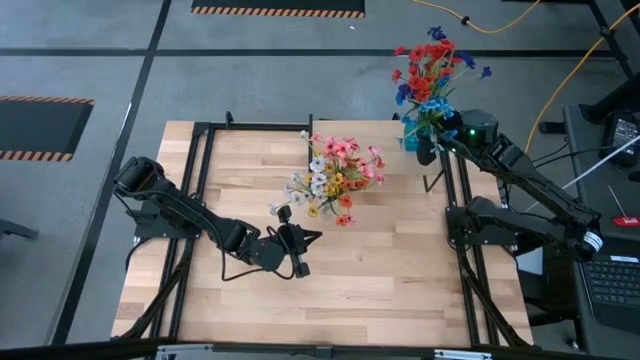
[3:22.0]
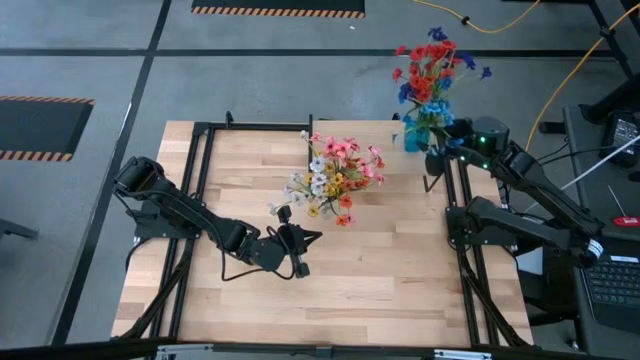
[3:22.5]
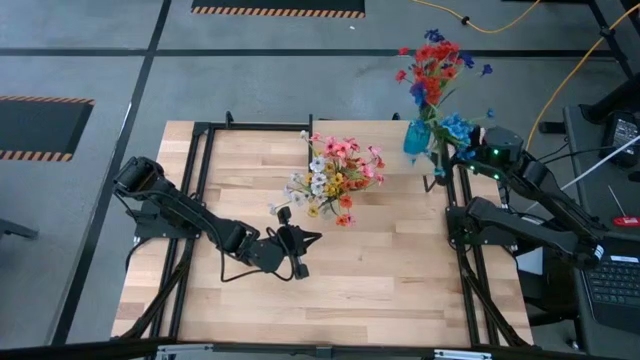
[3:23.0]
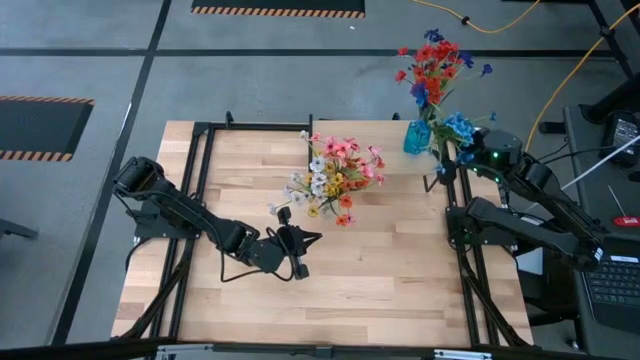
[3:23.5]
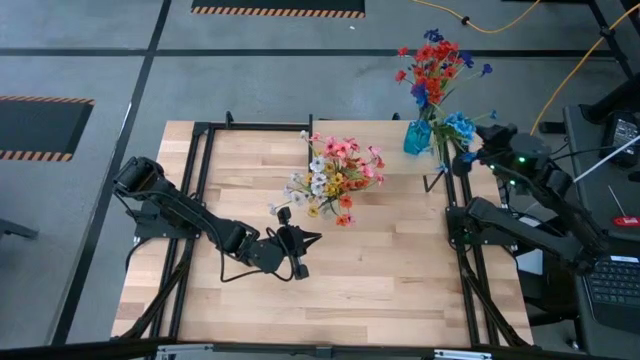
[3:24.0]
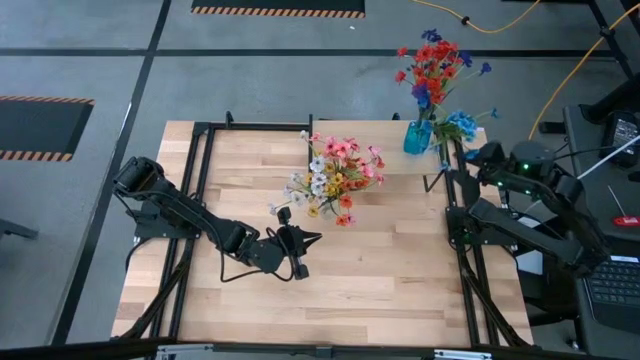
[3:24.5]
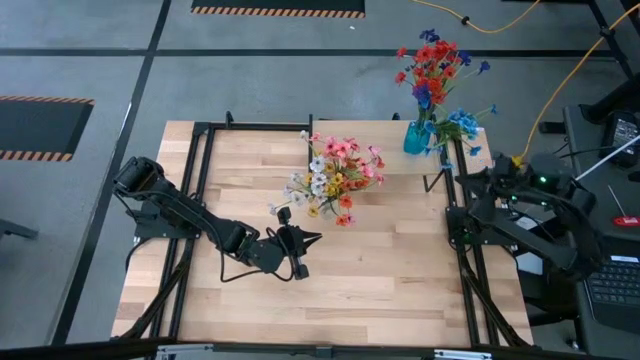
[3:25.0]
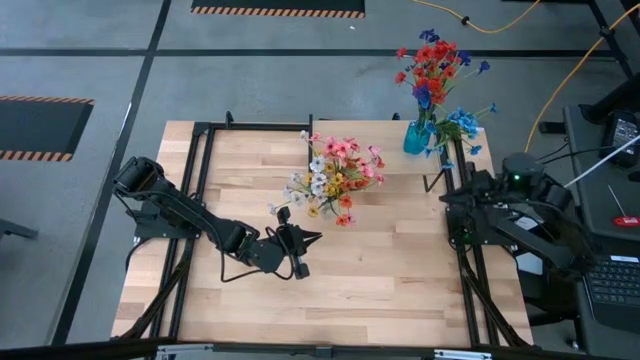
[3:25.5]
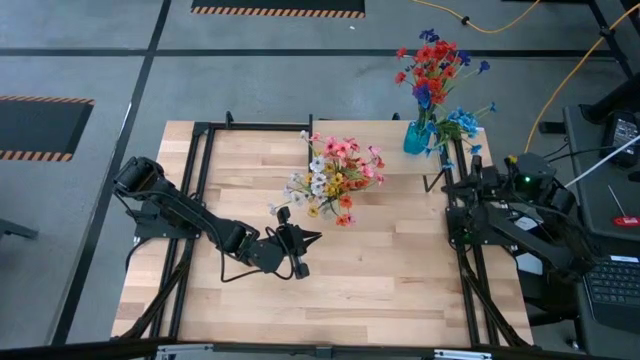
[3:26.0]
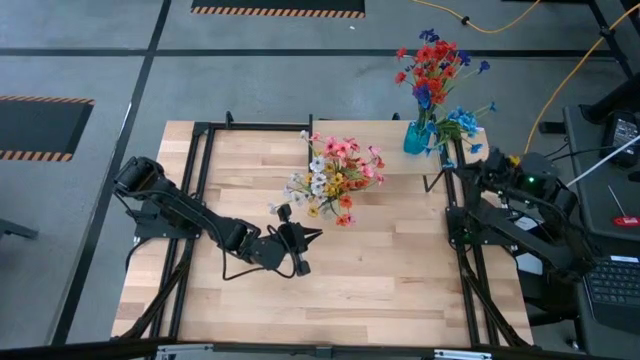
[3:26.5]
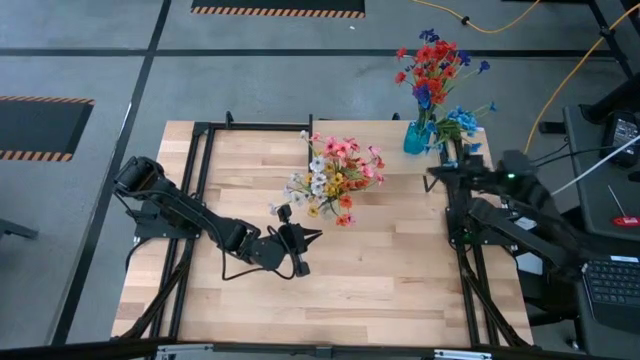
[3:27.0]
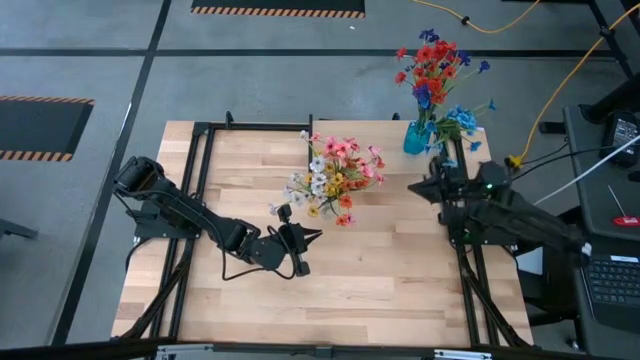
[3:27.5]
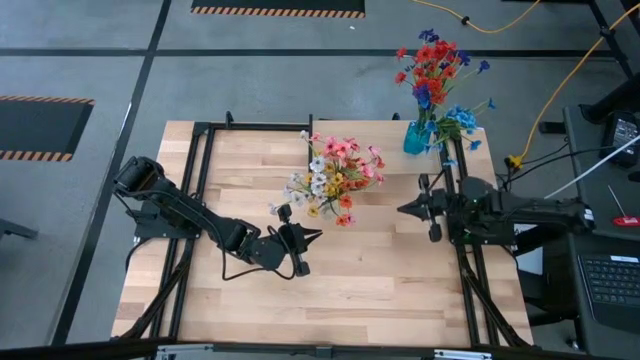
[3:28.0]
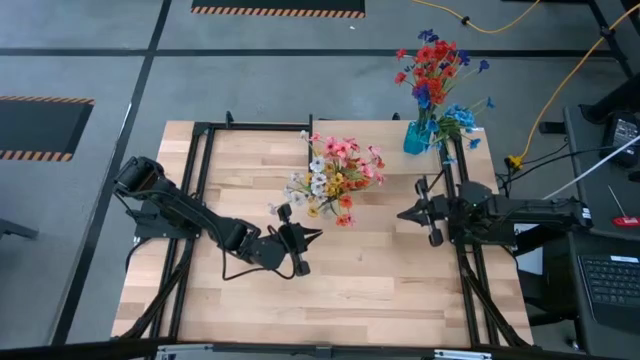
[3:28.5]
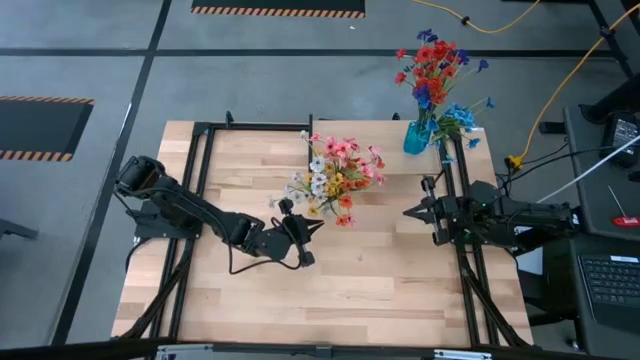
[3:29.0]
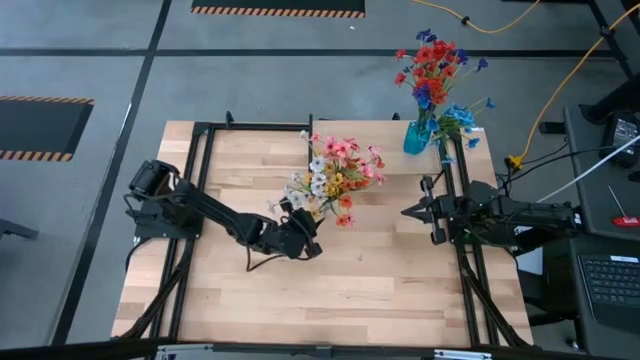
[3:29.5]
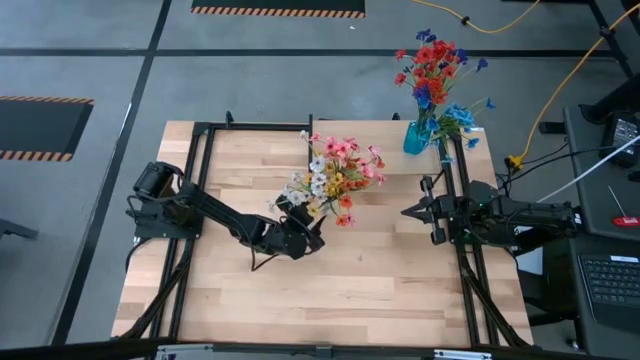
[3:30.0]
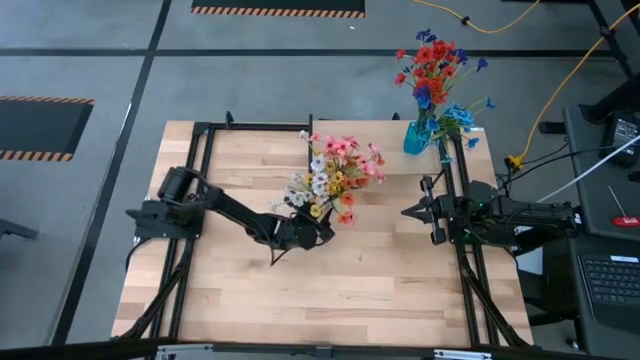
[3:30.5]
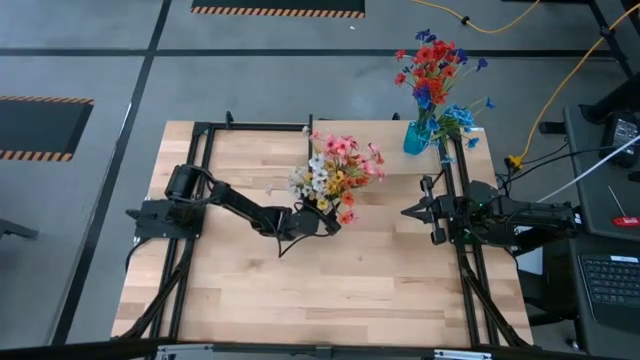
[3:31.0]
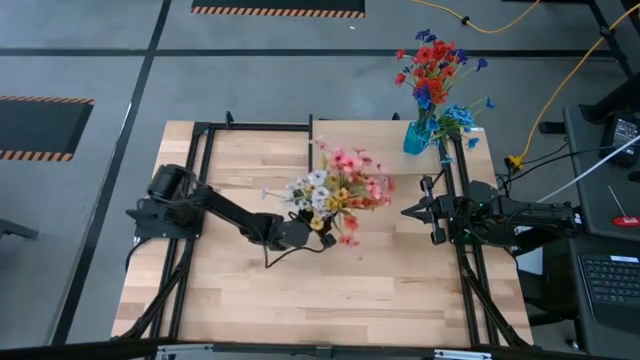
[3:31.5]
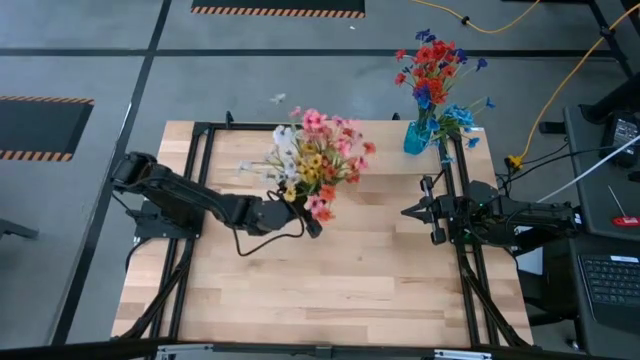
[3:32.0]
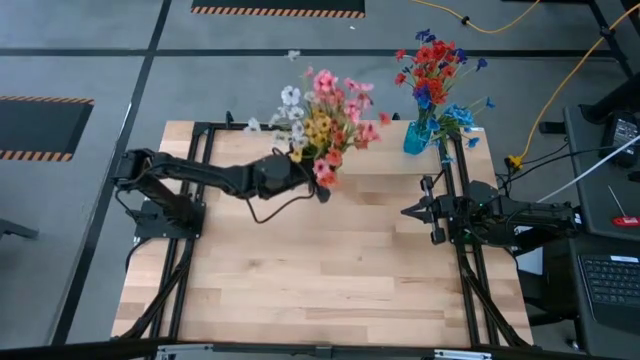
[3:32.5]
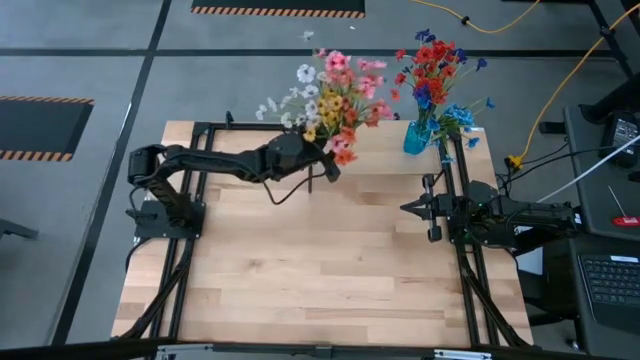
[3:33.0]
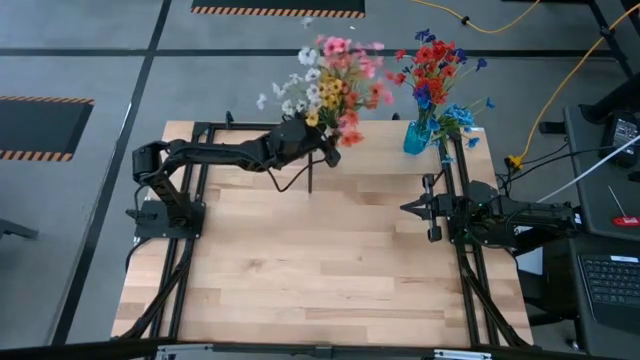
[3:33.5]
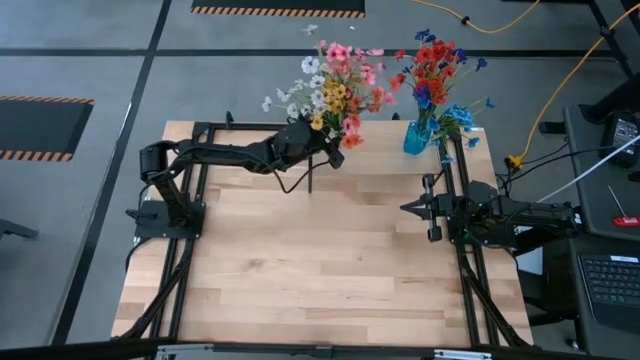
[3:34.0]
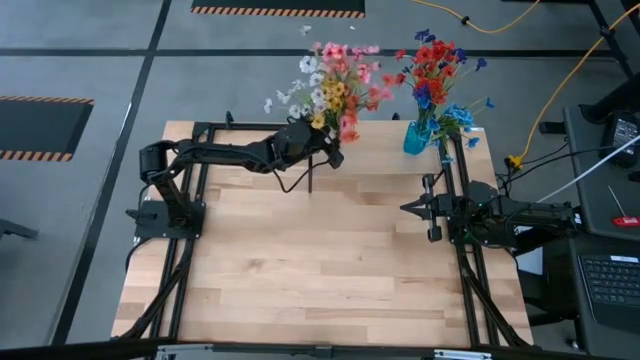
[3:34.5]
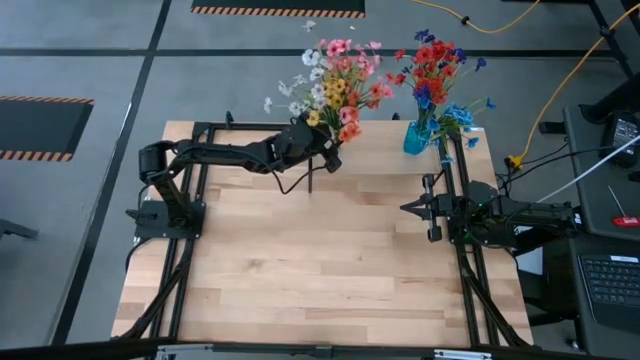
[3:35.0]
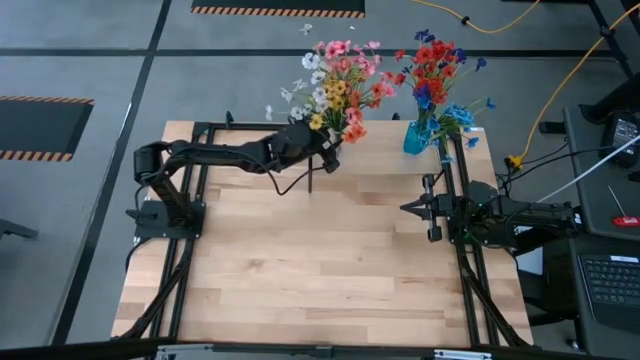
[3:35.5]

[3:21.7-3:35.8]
Task: Pick and place flowers into a vace then onto a shelf
Put the transparent vase on the shelf

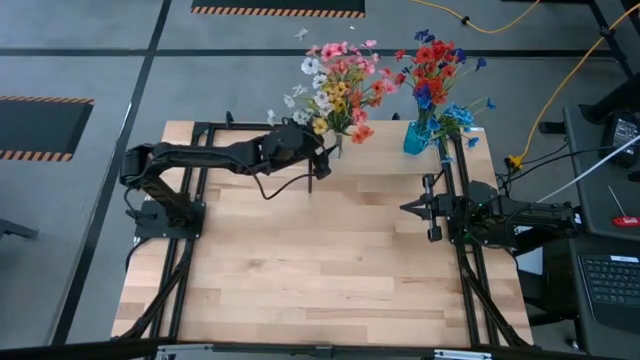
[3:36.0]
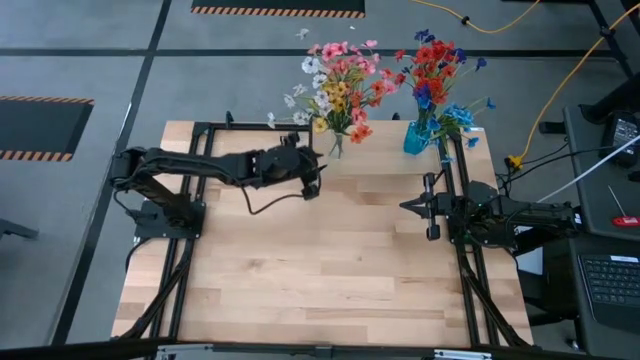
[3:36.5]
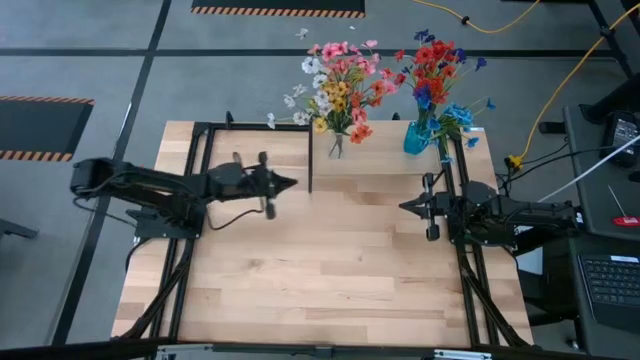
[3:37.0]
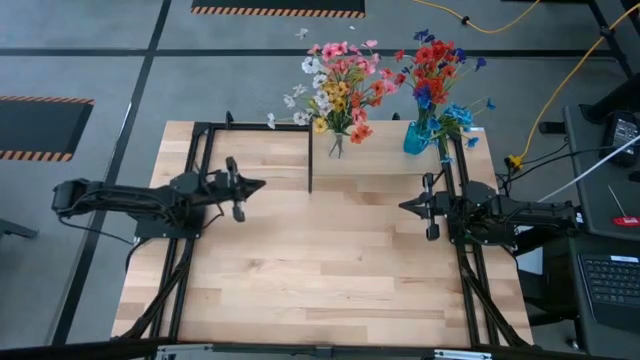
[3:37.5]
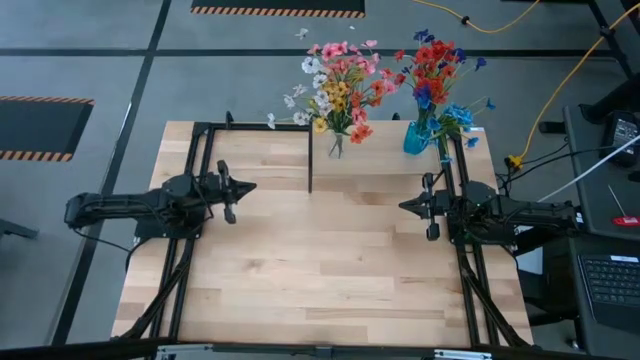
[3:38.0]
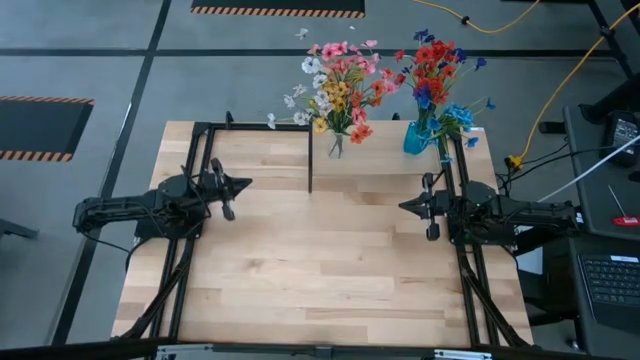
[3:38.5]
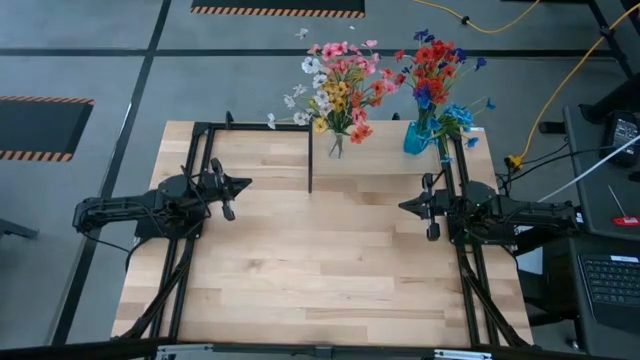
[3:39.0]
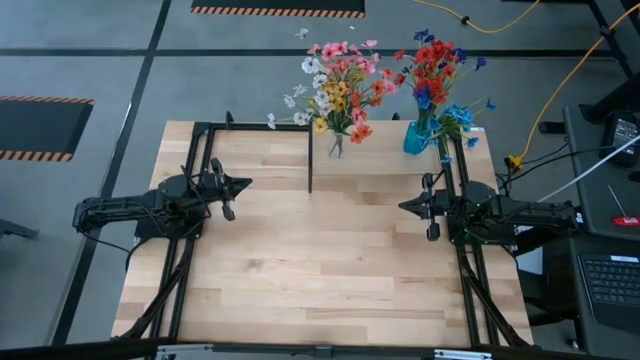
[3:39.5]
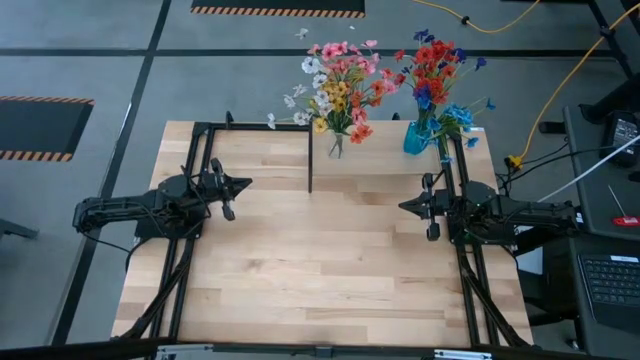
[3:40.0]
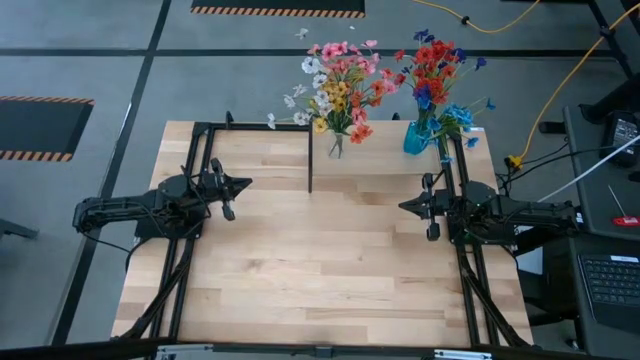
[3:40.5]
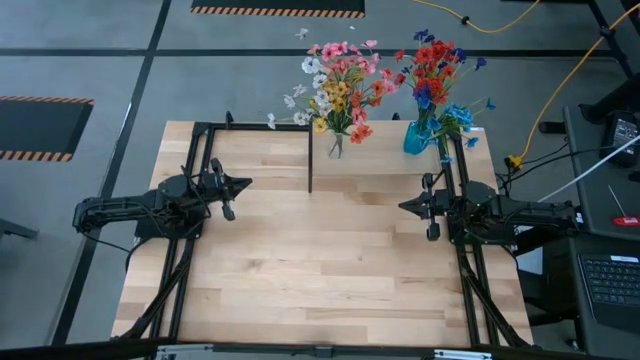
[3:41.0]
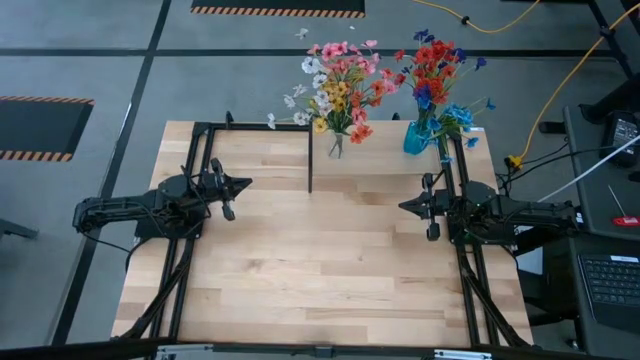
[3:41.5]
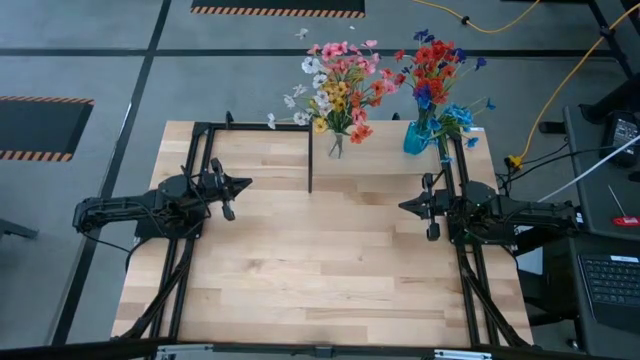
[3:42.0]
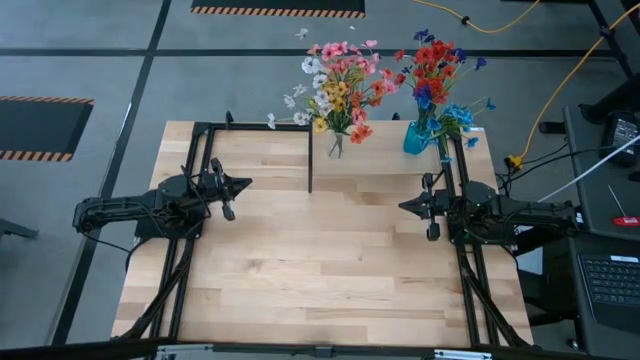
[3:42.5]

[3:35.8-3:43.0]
Return to Home Position
